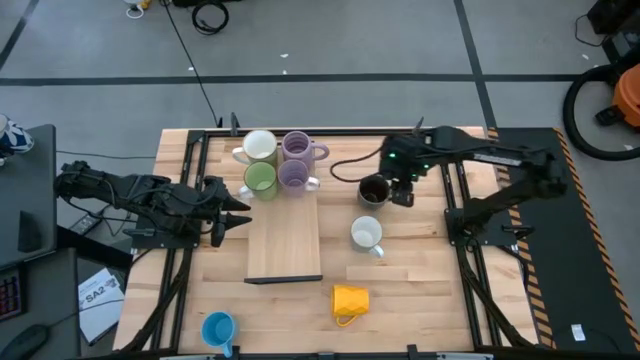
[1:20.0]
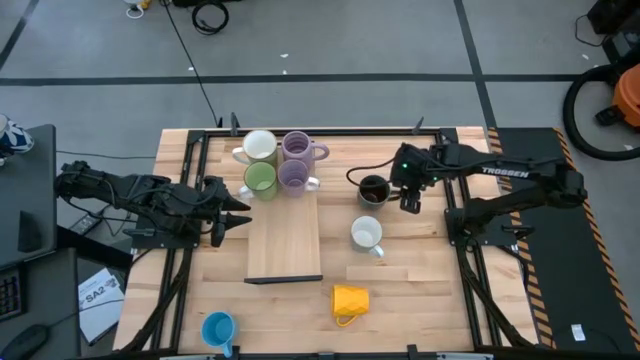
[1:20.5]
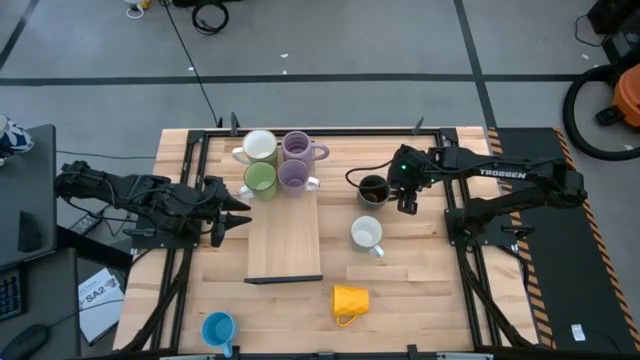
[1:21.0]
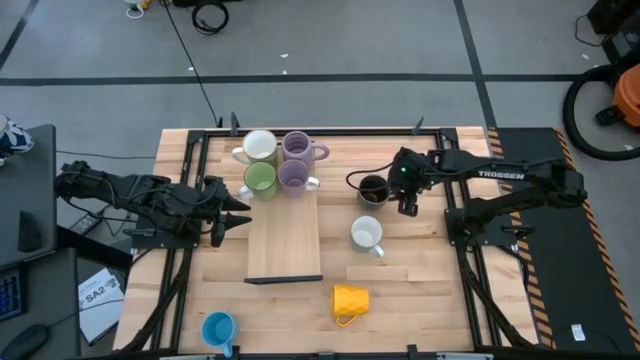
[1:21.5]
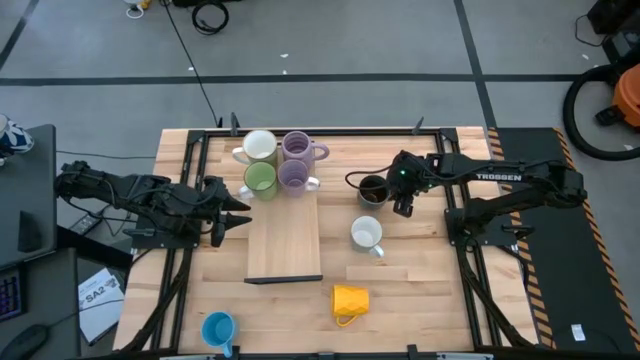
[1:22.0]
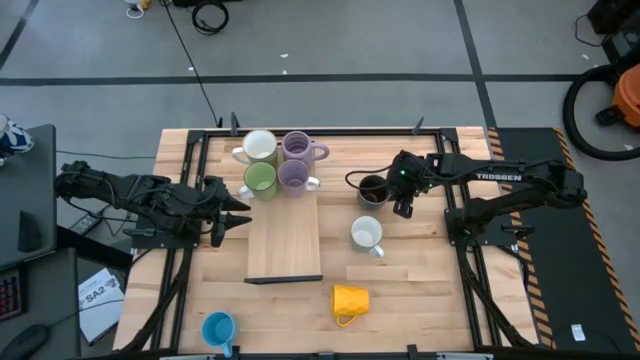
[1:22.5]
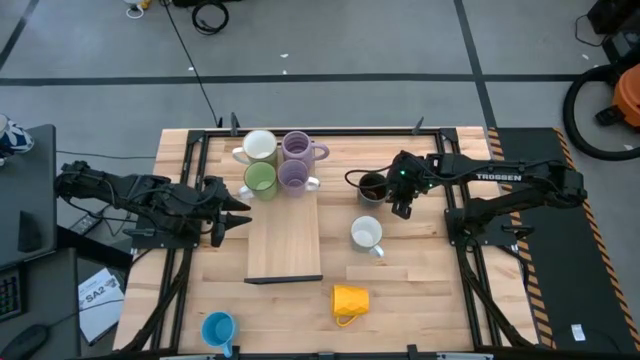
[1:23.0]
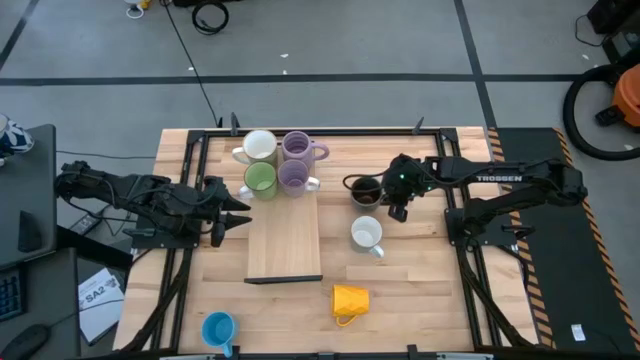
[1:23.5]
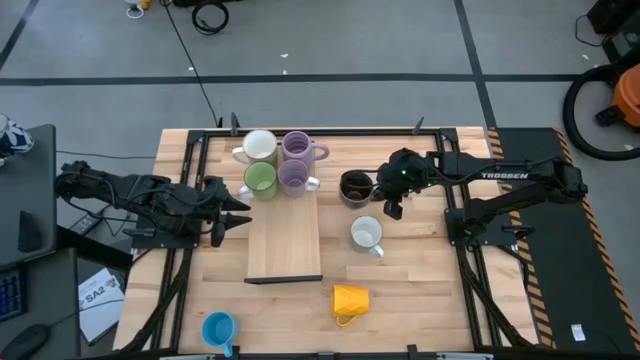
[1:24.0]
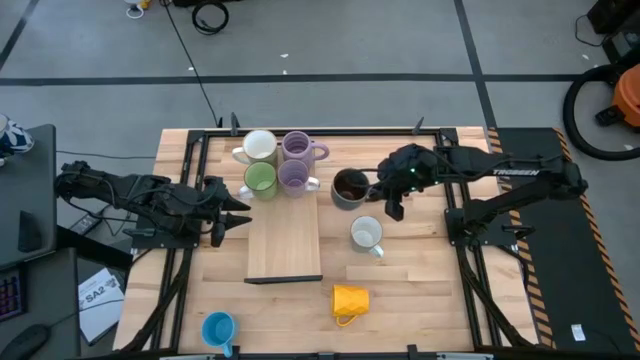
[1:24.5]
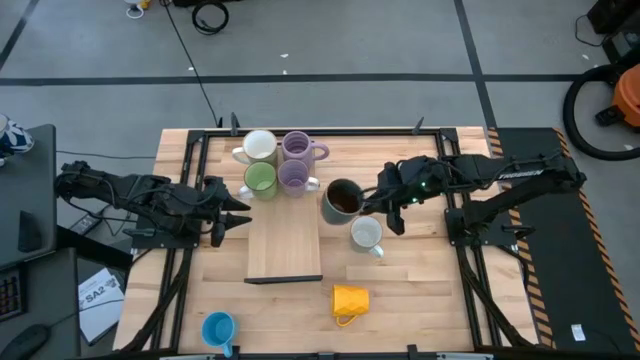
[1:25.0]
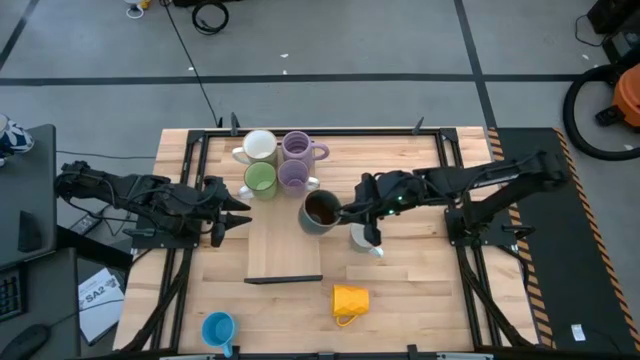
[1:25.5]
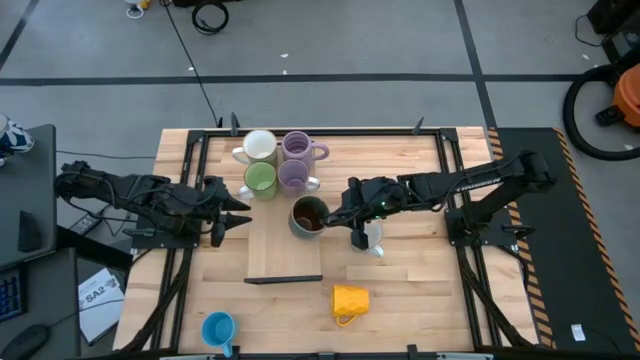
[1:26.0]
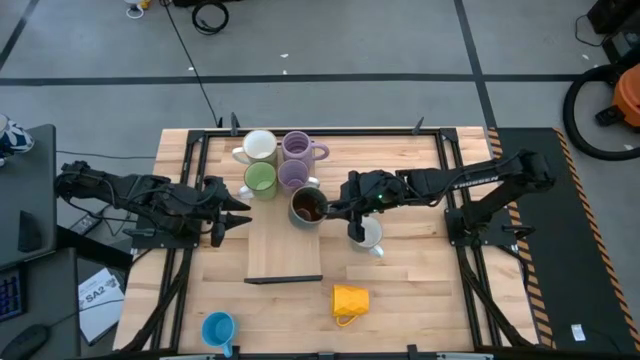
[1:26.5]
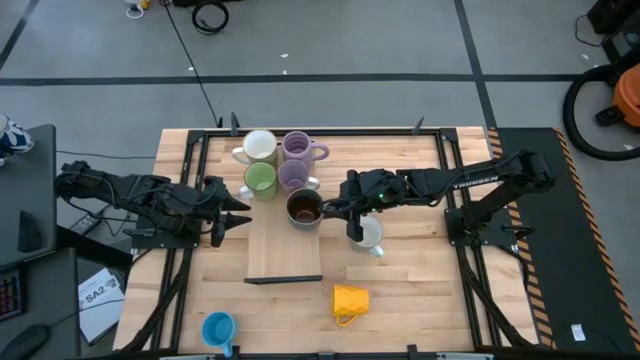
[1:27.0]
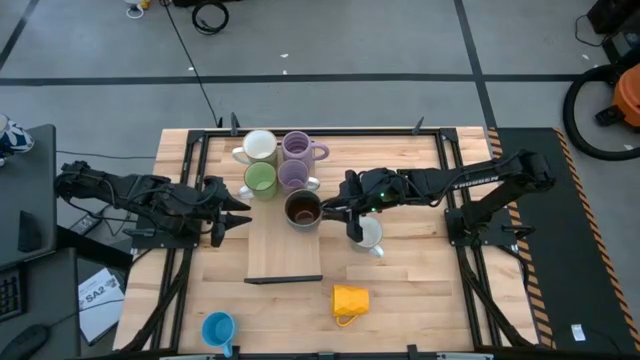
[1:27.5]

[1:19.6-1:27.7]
Task: Place coffee mugs
Put the blue patterned mug on the shelf

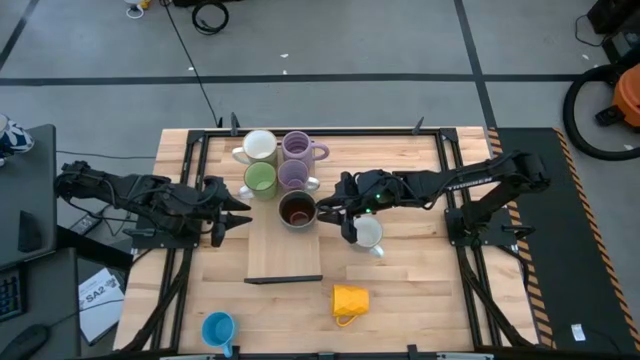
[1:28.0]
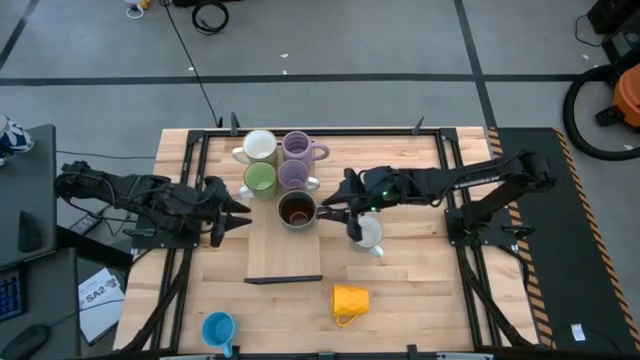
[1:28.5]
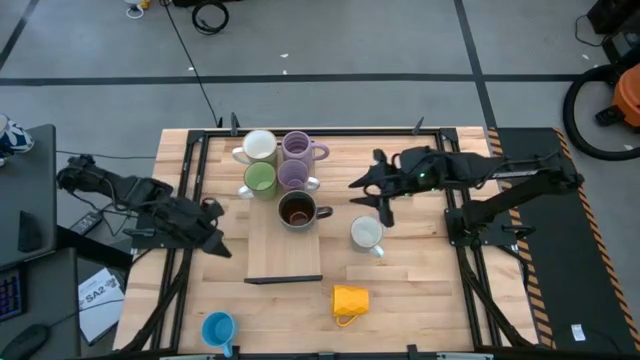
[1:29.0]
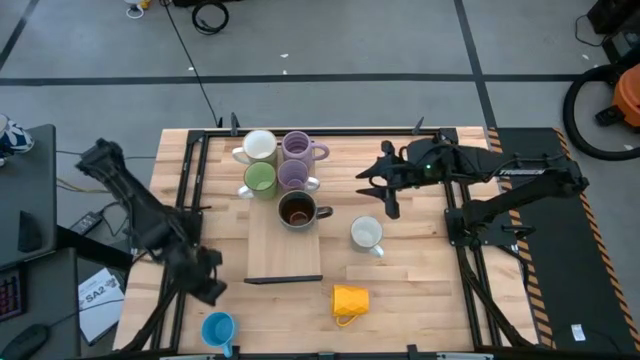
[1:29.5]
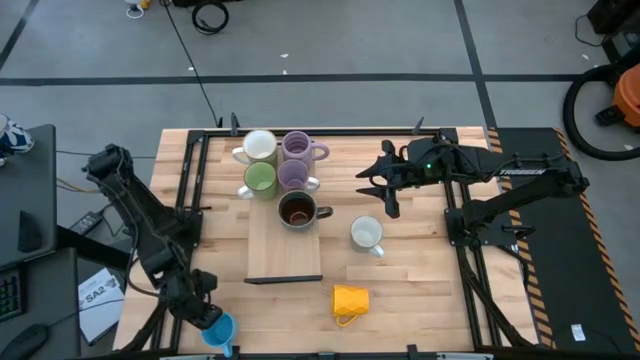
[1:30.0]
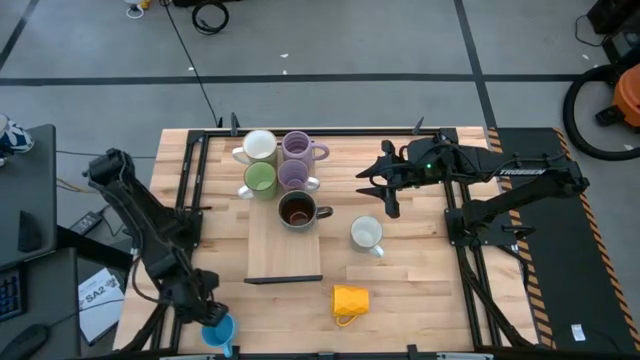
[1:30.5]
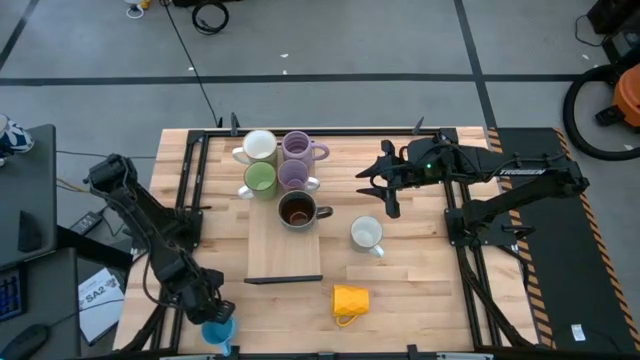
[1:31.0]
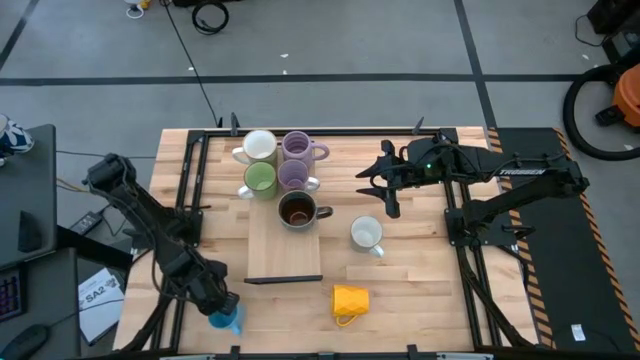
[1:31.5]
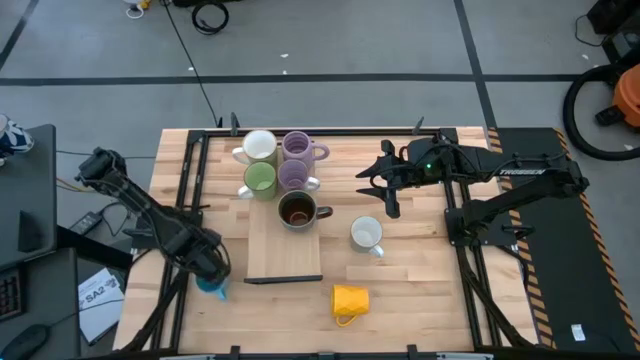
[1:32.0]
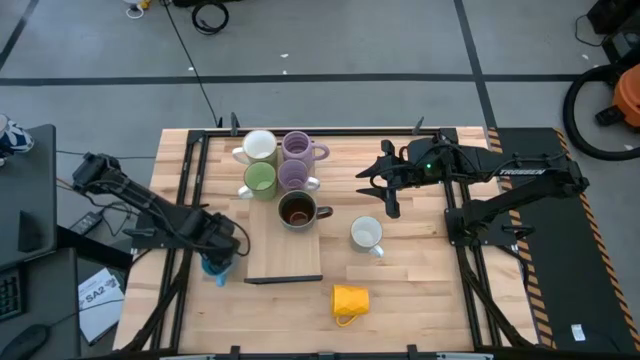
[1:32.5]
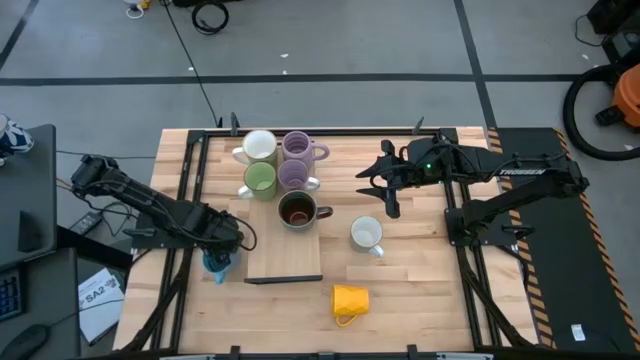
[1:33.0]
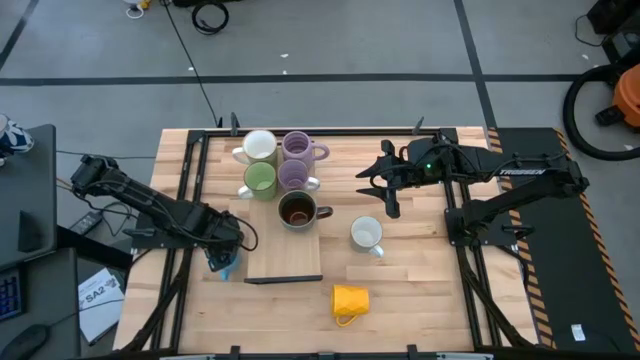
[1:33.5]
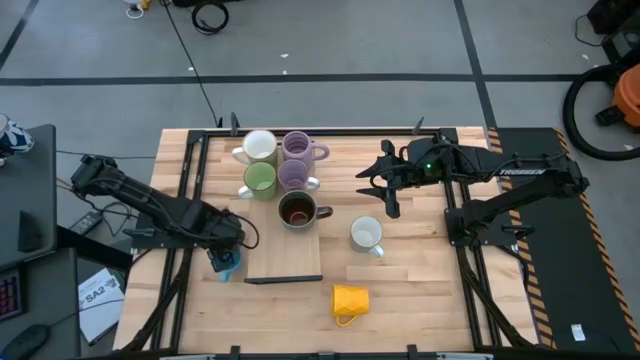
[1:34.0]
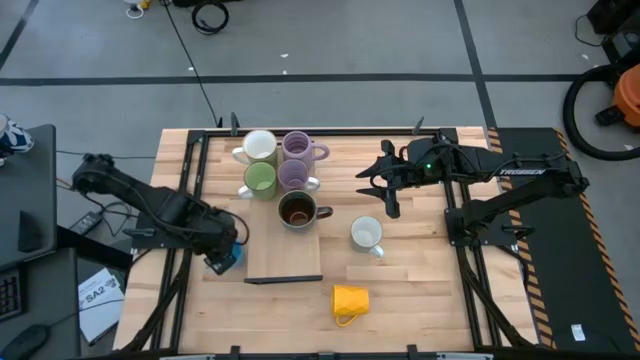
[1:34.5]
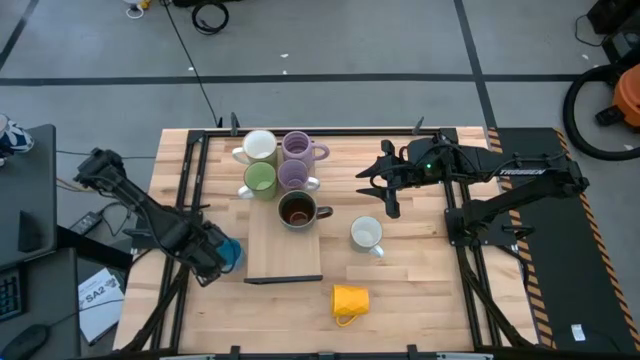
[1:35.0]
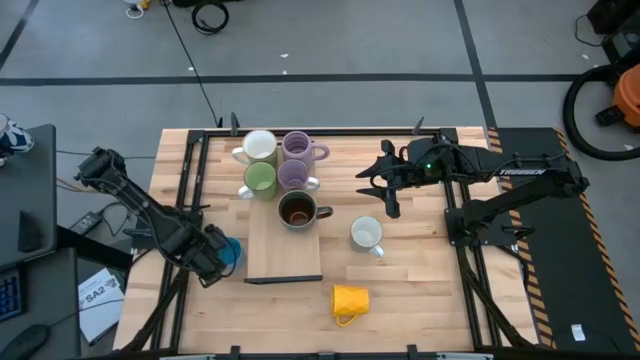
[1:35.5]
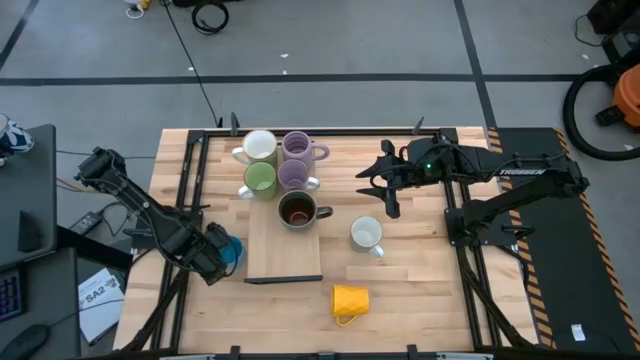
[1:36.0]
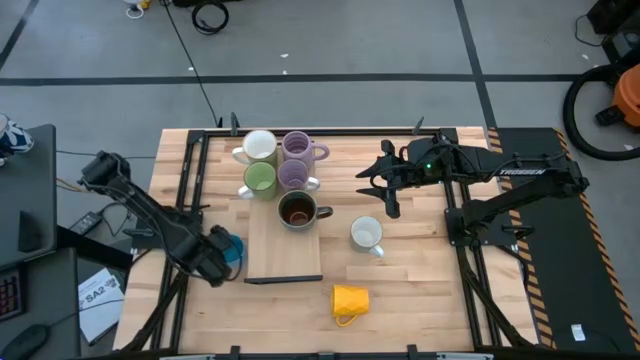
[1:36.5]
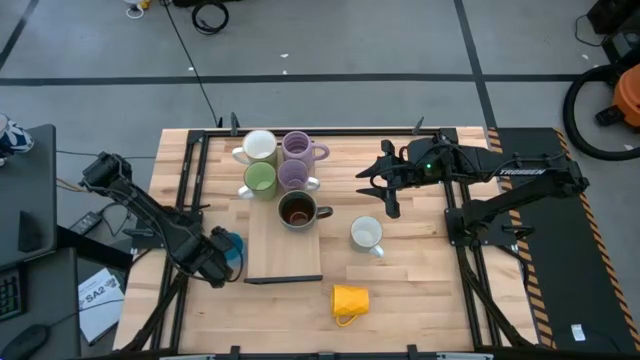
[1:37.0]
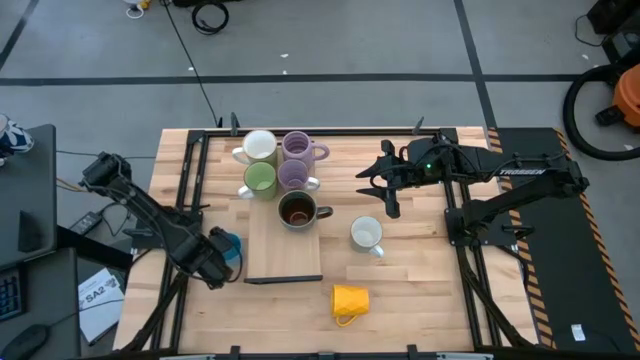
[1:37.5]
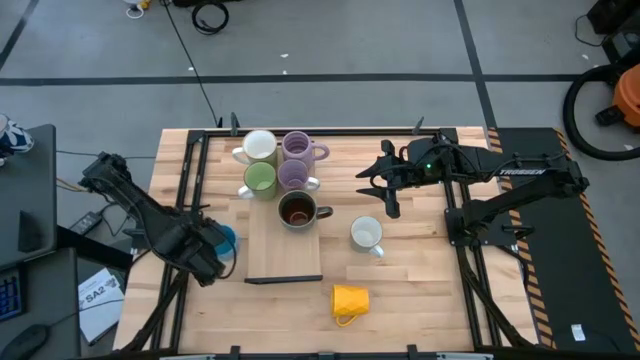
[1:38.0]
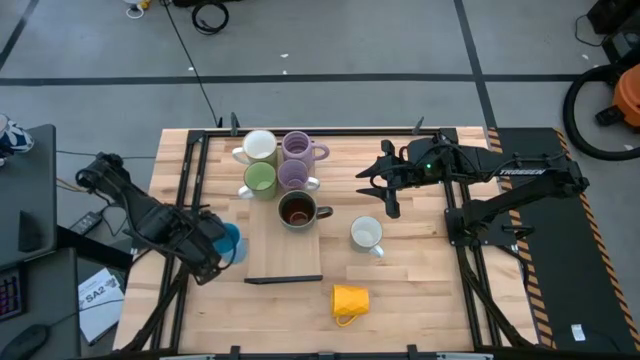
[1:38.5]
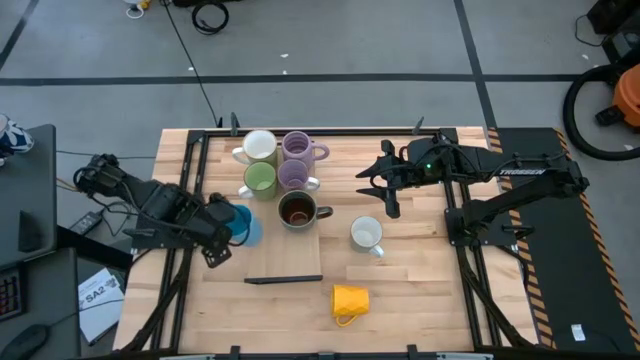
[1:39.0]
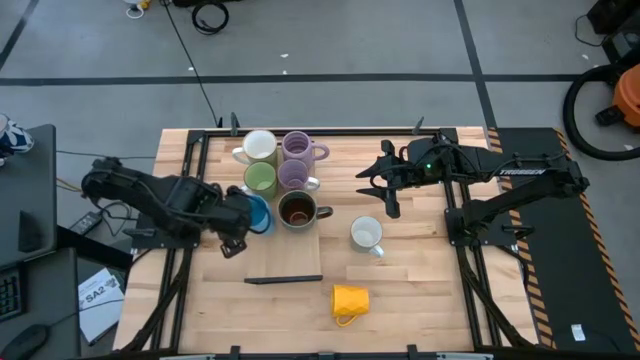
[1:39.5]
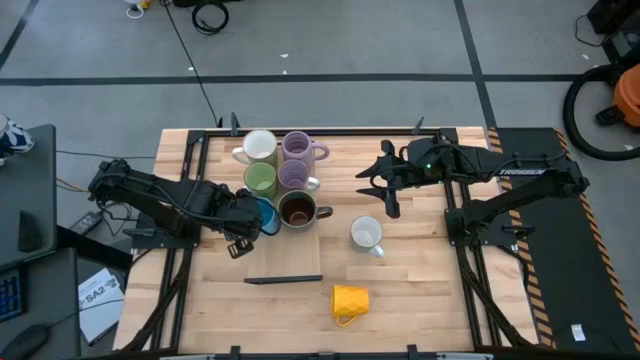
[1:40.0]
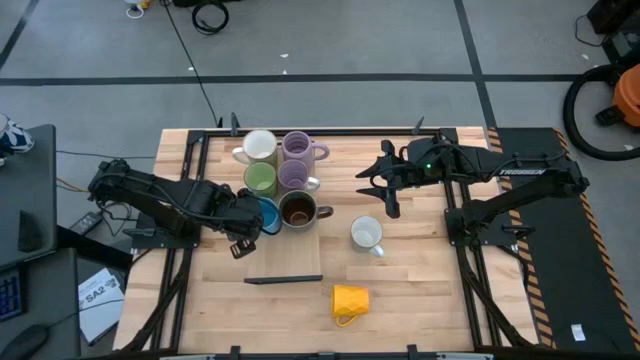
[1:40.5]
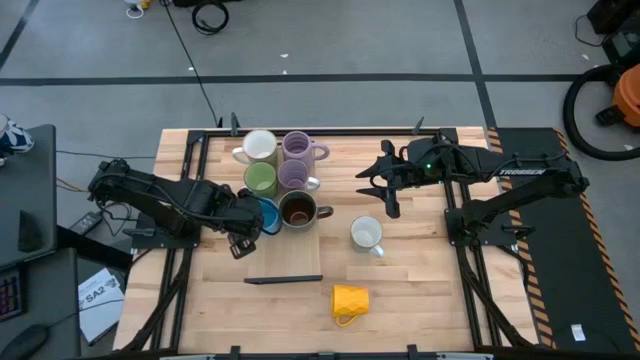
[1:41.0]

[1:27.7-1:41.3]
Put the blue mug on the shelf

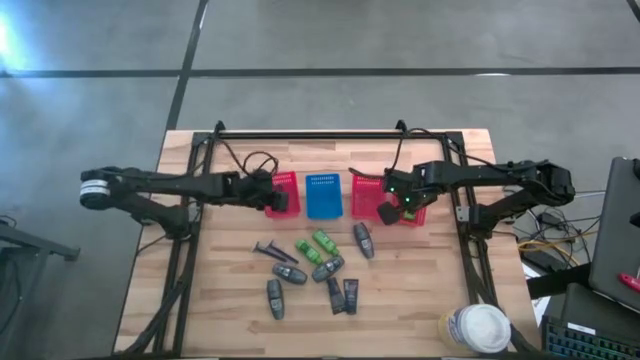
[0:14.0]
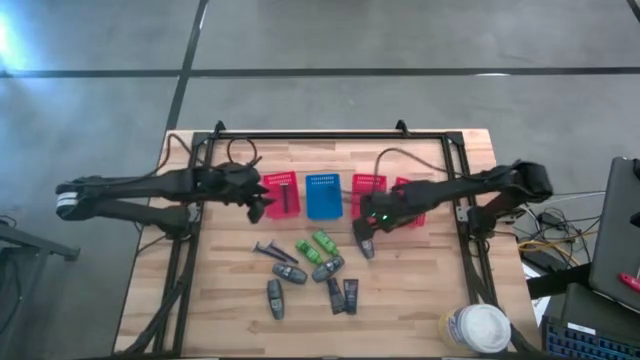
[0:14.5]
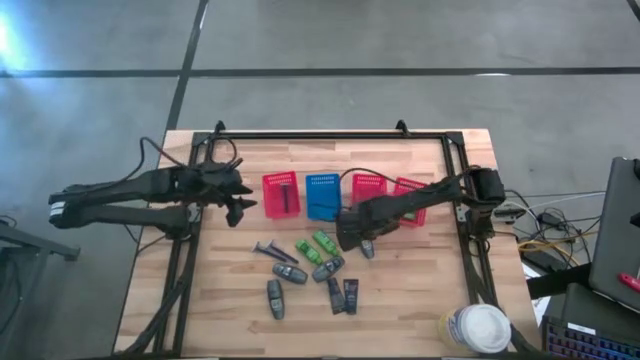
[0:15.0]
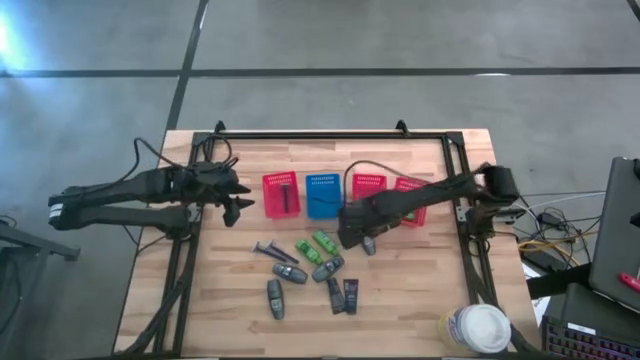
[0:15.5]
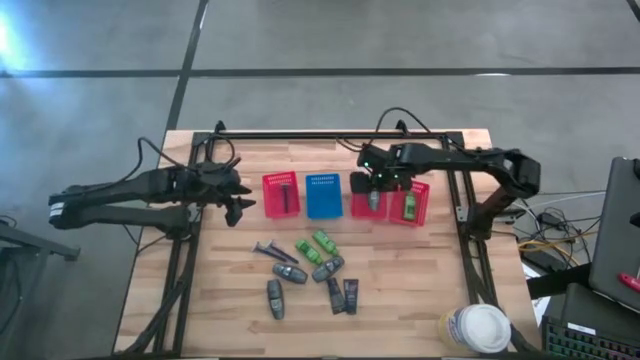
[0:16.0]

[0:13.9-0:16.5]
Task: Pick & Place Travel size toiletries
Put the gray deodorant into the middle red bin
